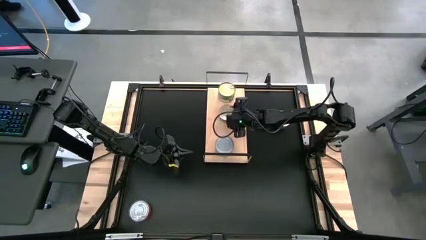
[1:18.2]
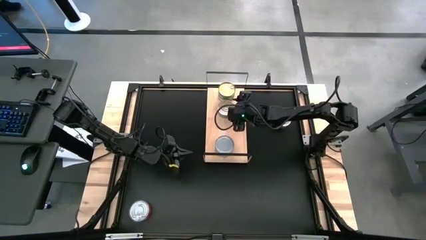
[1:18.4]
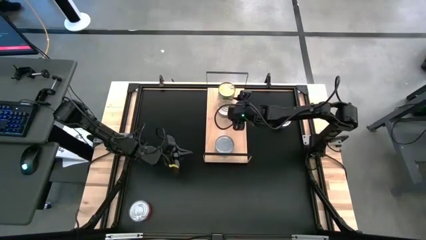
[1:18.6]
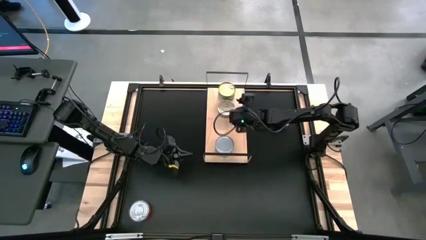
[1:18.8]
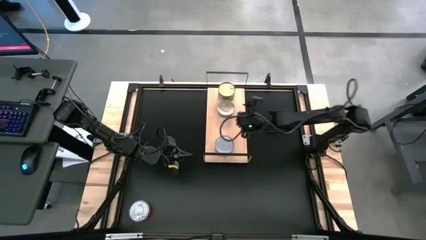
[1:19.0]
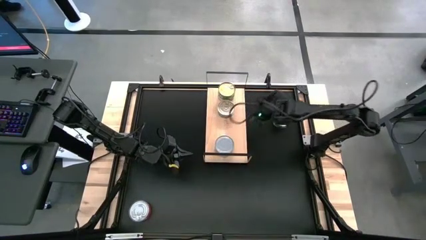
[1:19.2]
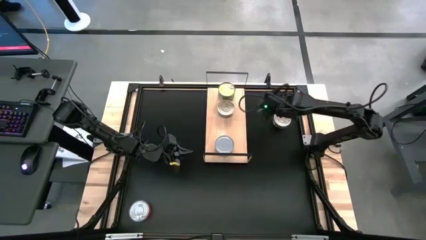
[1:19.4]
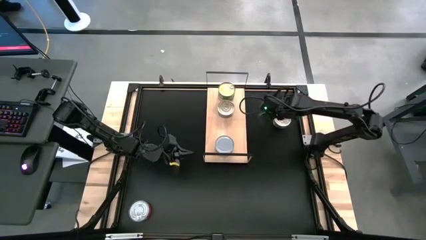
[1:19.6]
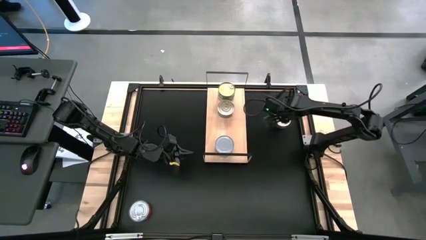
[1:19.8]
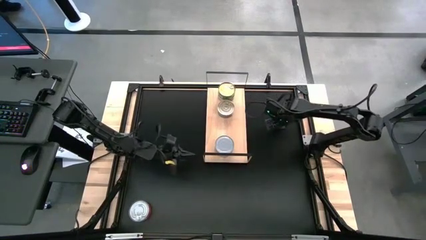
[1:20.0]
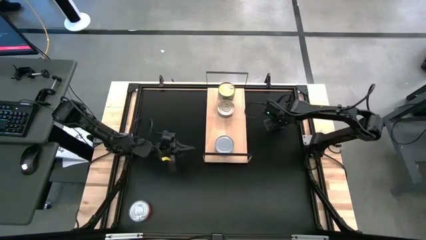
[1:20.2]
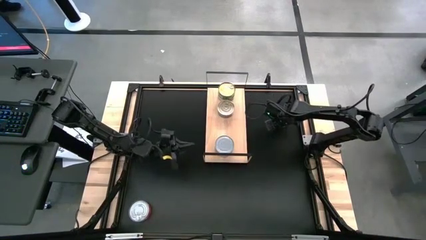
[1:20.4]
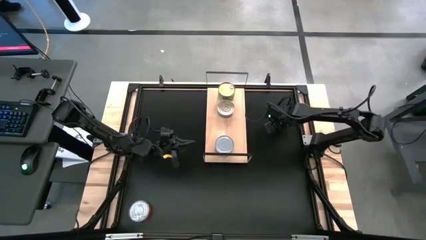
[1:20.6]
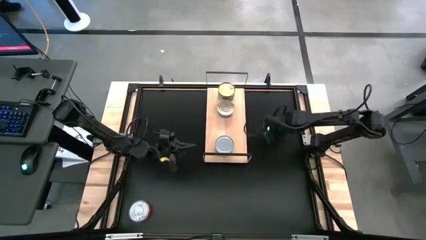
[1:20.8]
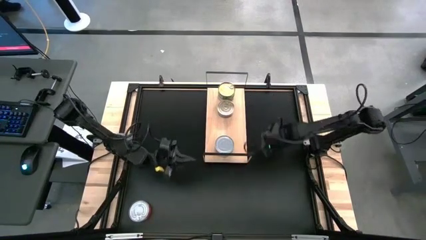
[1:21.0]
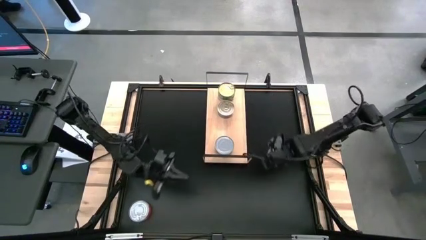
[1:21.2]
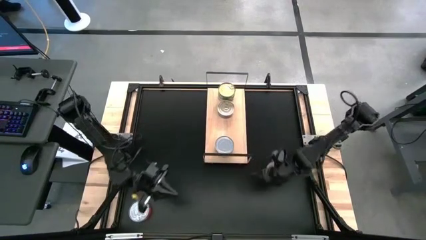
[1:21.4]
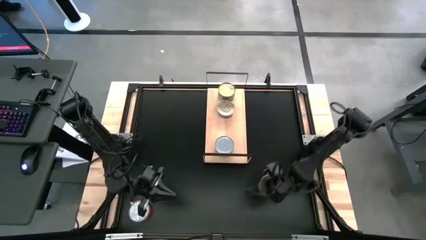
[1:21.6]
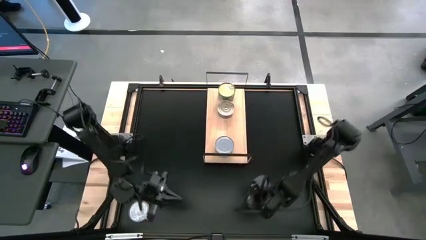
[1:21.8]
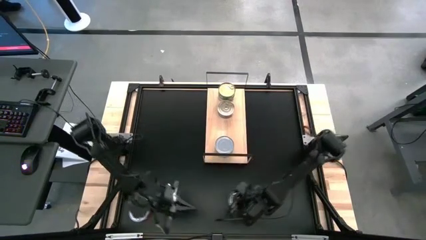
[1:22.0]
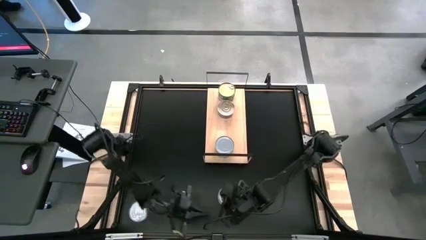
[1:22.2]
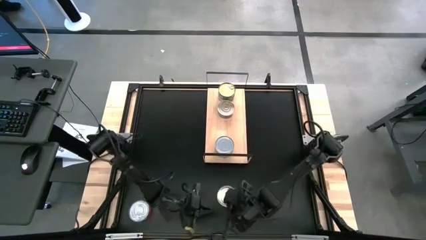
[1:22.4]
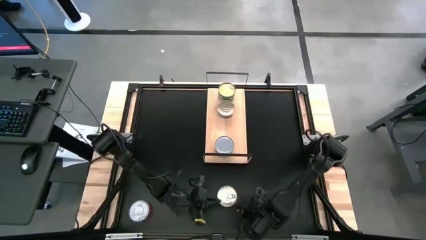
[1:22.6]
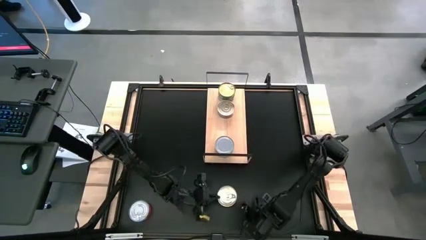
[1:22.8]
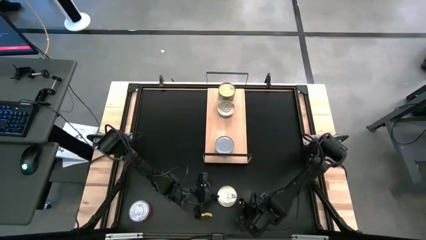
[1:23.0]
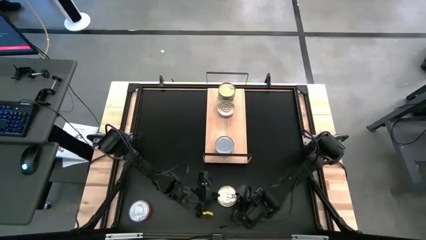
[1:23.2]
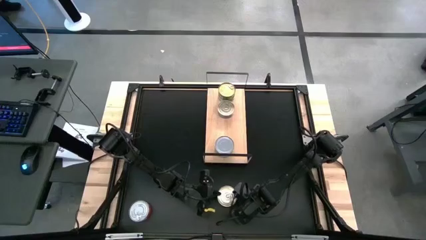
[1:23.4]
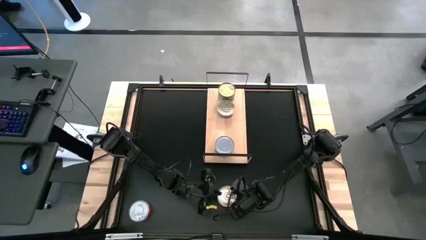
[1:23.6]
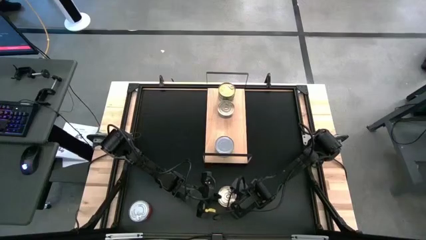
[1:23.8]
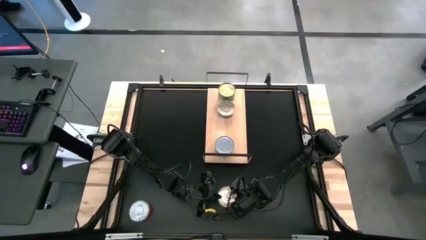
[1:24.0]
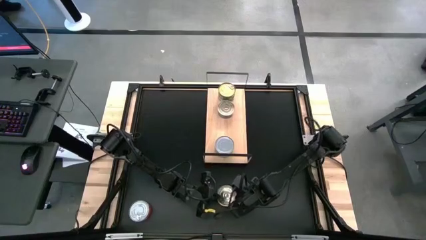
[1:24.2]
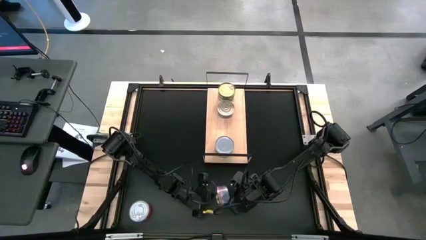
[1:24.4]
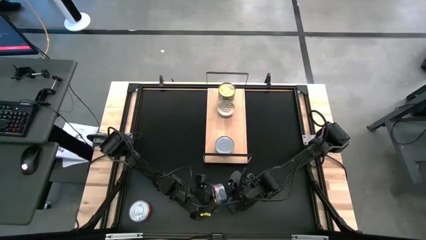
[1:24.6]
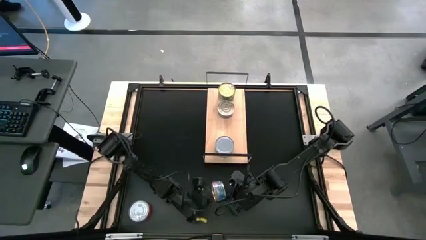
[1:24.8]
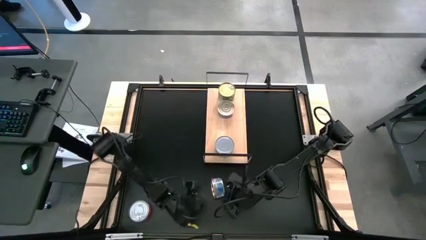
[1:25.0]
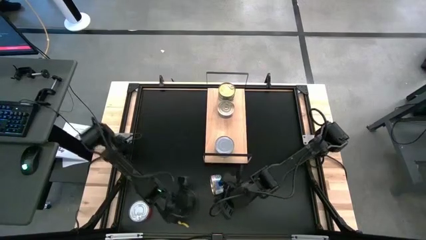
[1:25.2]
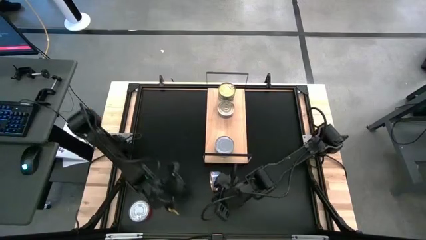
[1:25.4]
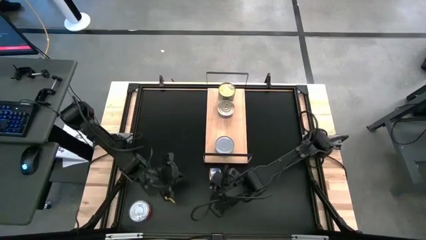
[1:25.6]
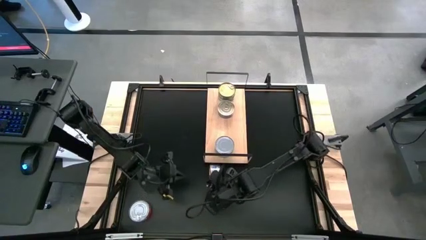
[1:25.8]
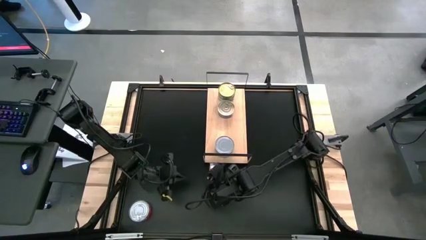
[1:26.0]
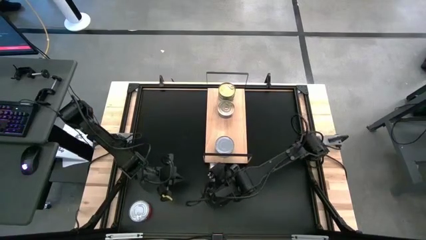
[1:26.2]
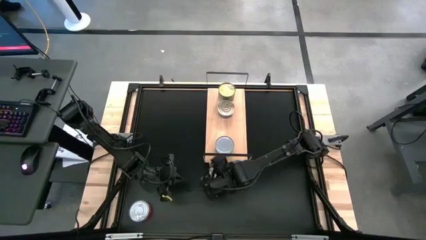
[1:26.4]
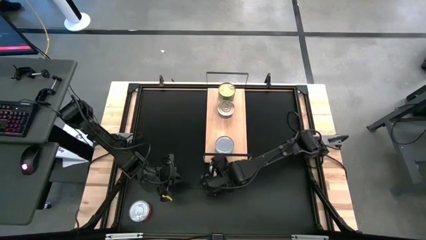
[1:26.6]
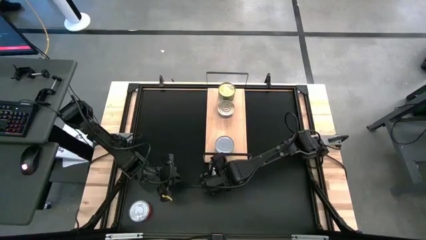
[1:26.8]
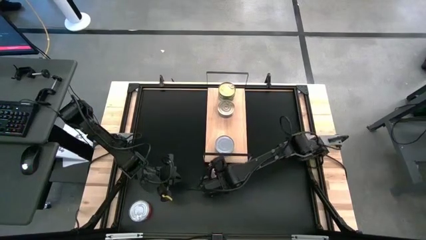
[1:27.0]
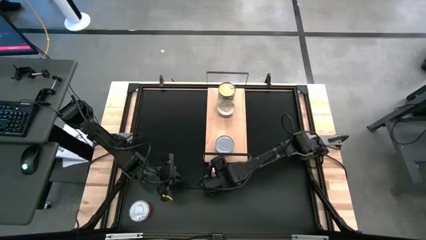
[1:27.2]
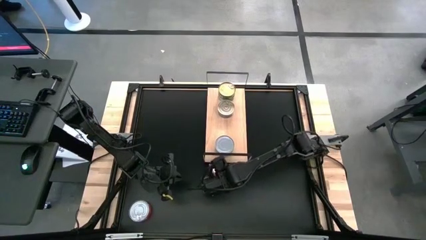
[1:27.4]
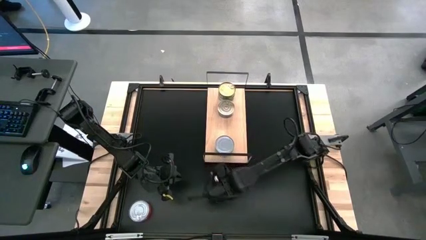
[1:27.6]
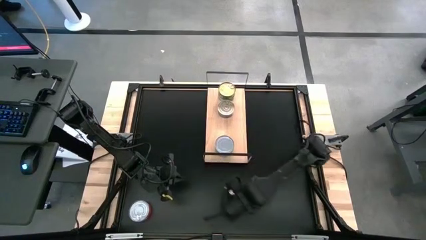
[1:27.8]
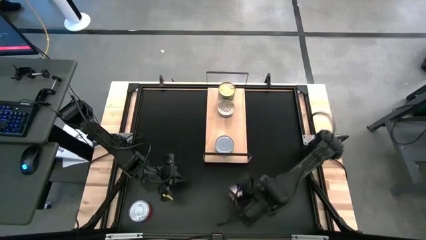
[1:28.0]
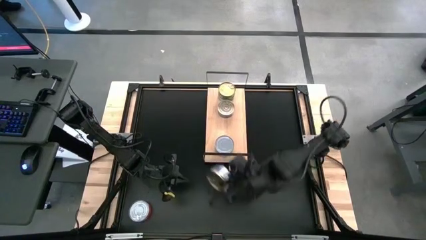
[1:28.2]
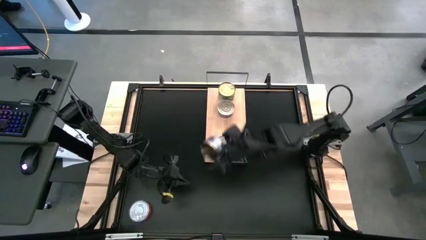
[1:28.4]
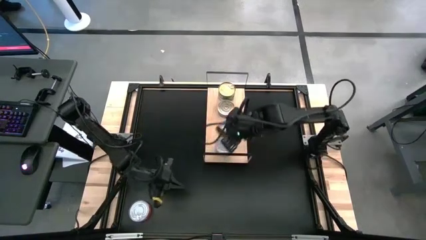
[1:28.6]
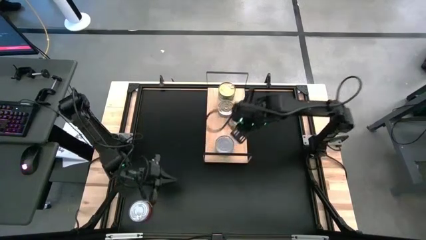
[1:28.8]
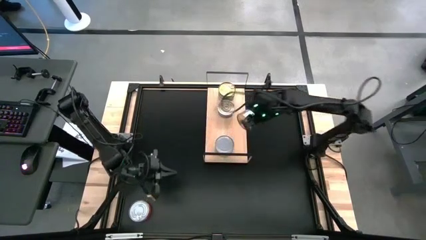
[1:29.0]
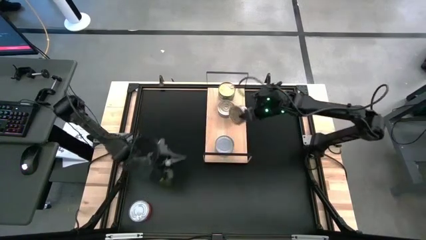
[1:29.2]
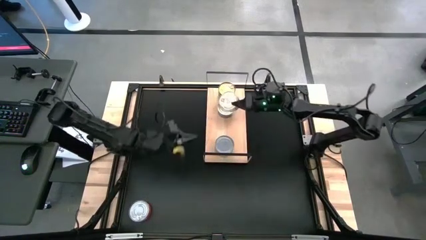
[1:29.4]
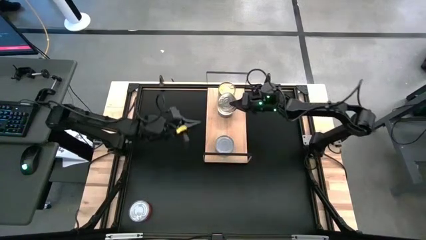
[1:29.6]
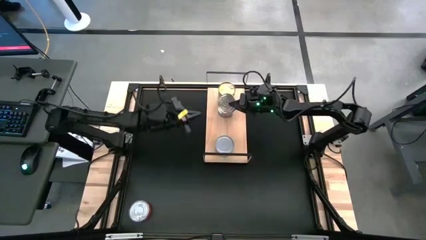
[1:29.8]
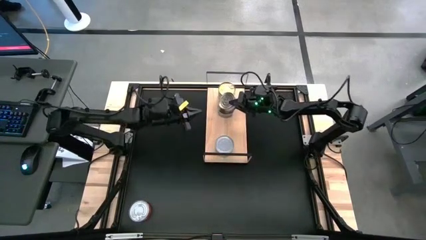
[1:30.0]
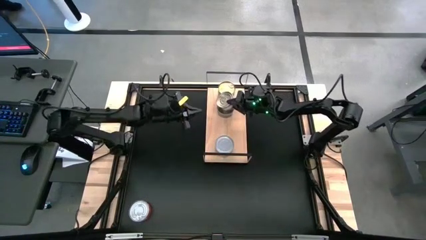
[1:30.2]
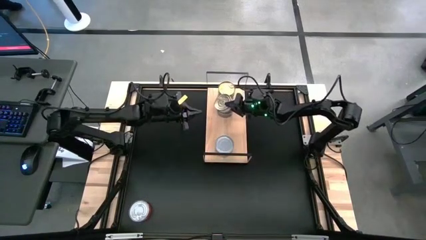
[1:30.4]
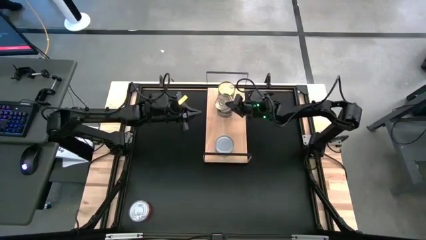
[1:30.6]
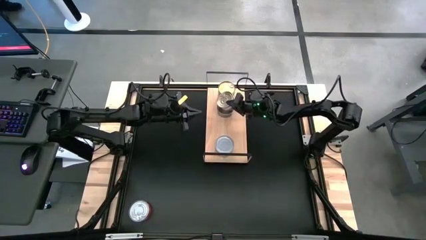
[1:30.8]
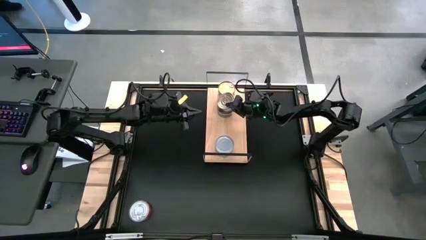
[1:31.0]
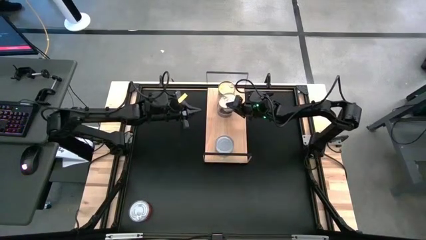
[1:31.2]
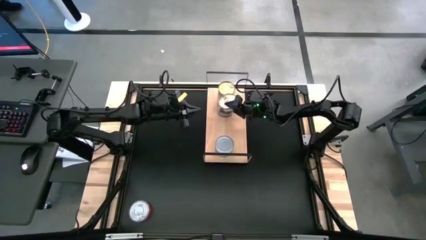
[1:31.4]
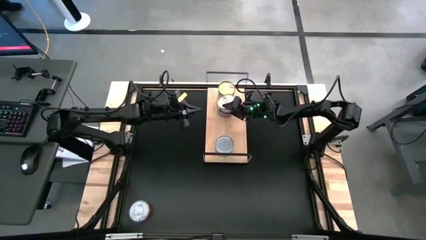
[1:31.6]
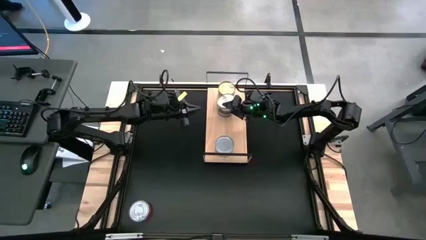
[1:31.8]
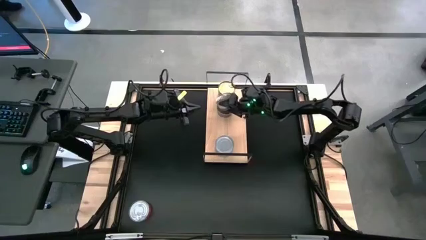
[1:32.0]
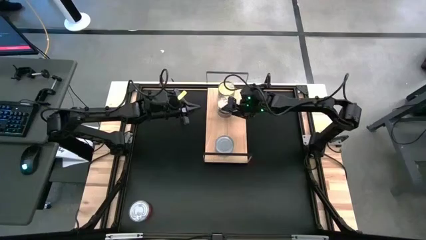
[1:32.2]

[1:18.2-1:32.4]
Task: Stack canned seafood by type on shelf
Stack the blue-pink tuna can on top of the other blue-pink tuna can on the shelf
